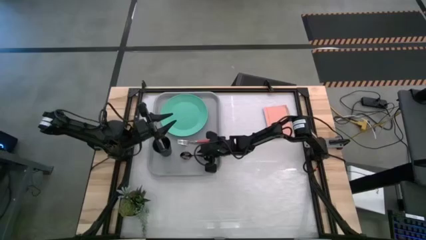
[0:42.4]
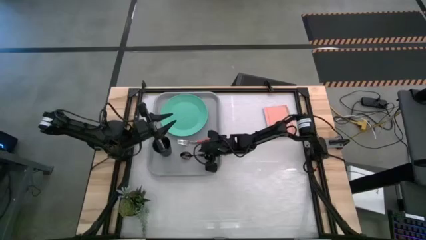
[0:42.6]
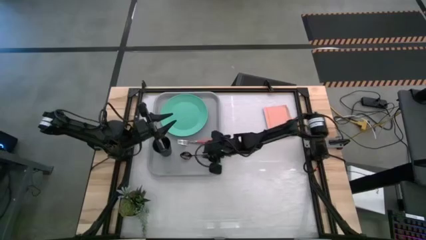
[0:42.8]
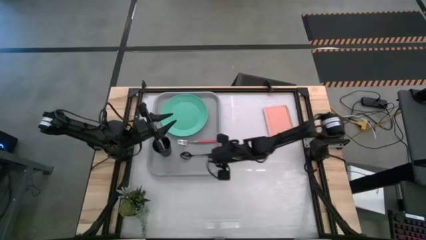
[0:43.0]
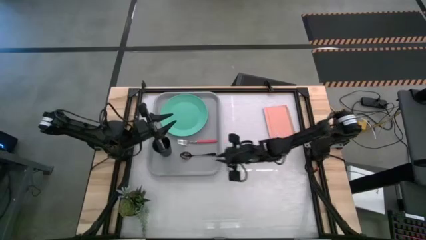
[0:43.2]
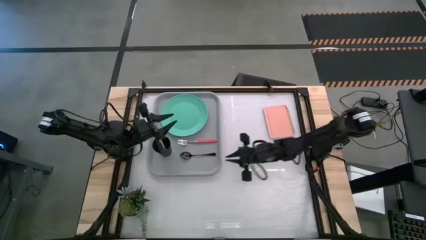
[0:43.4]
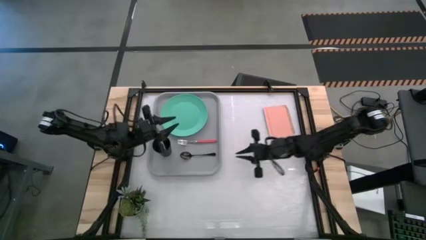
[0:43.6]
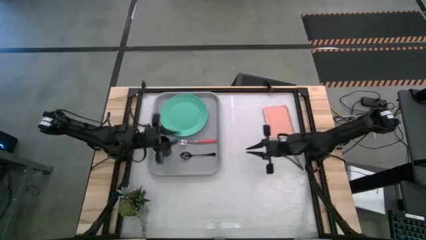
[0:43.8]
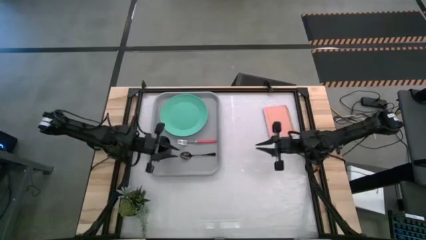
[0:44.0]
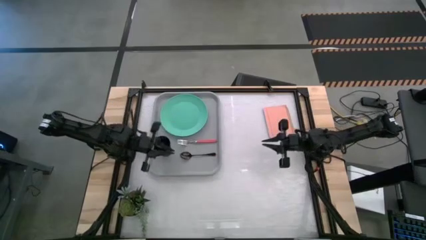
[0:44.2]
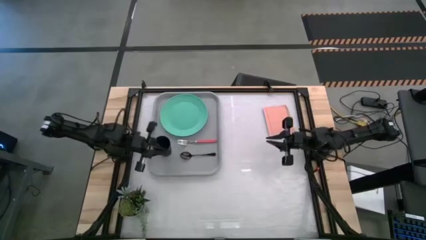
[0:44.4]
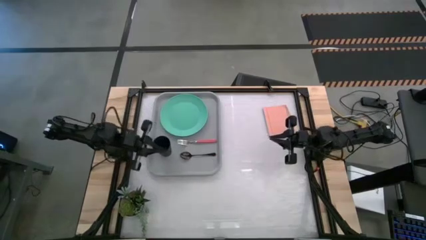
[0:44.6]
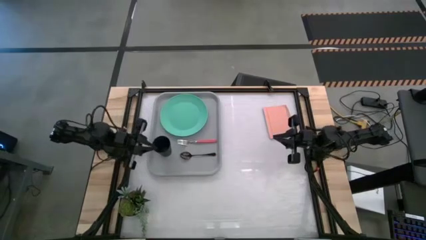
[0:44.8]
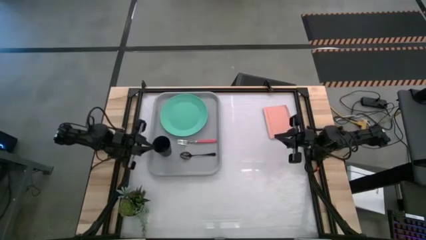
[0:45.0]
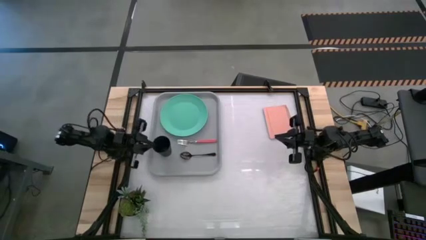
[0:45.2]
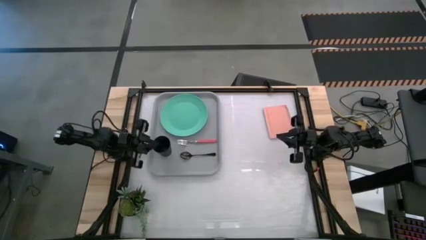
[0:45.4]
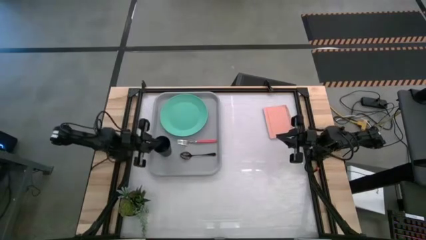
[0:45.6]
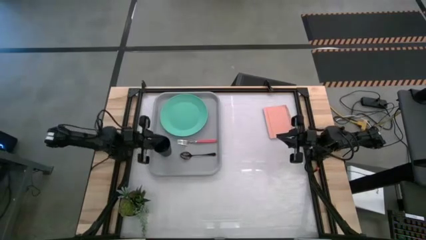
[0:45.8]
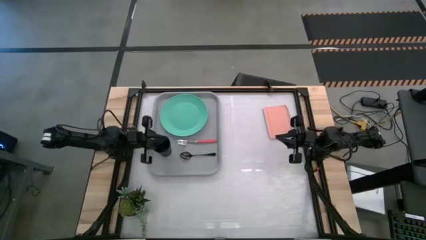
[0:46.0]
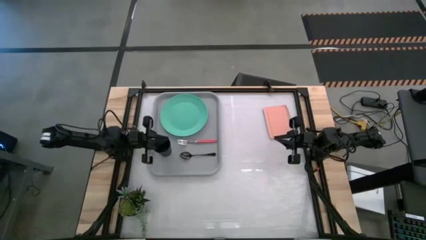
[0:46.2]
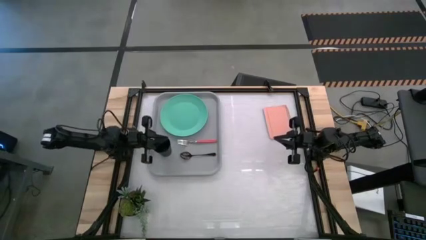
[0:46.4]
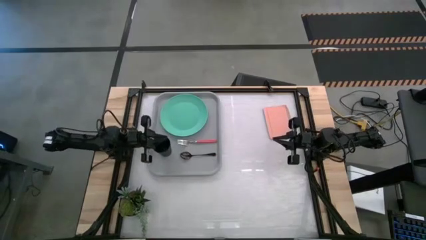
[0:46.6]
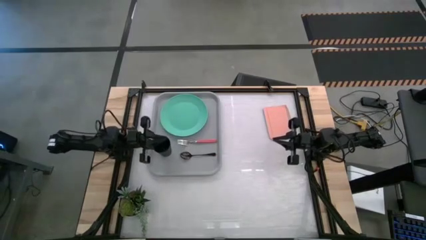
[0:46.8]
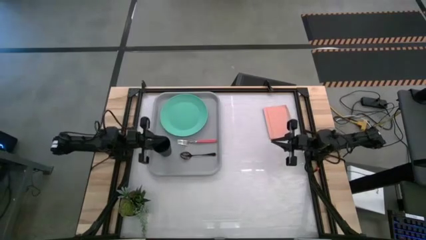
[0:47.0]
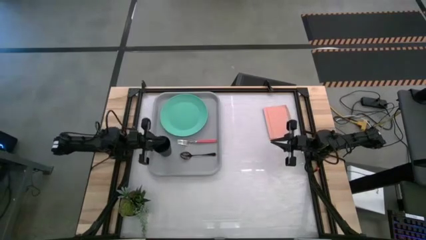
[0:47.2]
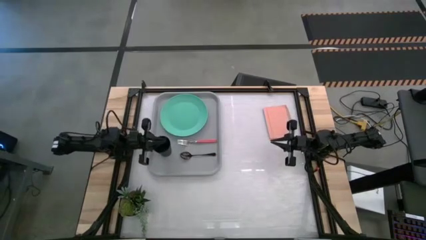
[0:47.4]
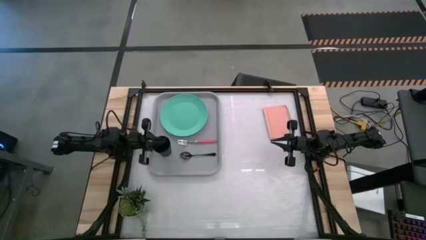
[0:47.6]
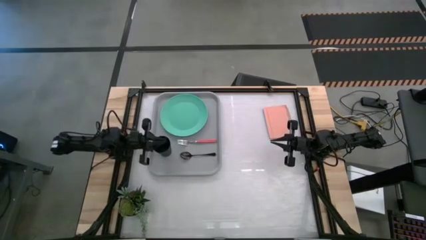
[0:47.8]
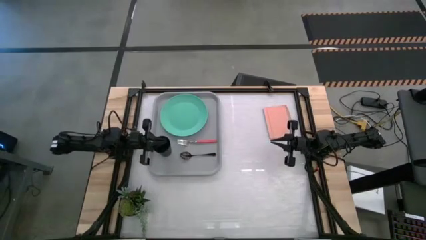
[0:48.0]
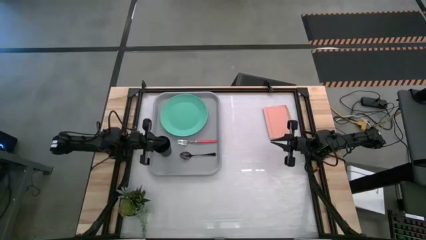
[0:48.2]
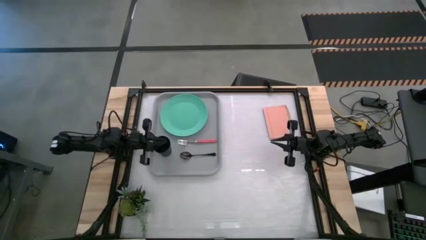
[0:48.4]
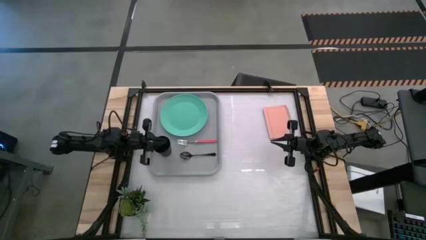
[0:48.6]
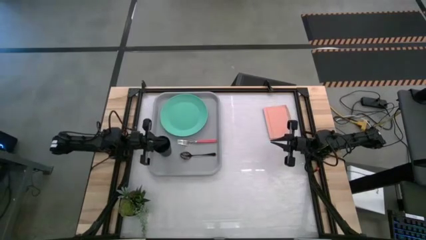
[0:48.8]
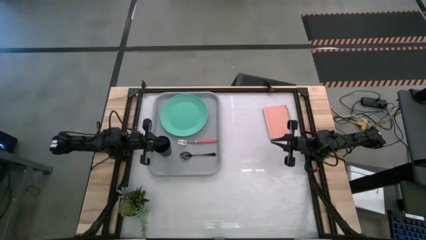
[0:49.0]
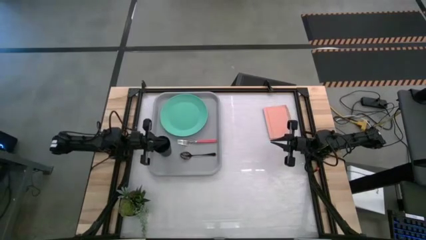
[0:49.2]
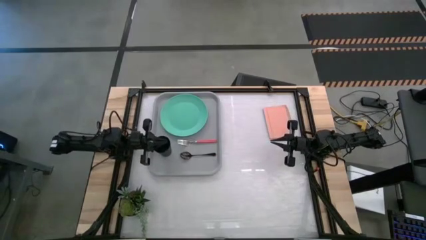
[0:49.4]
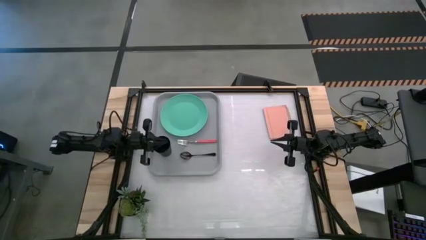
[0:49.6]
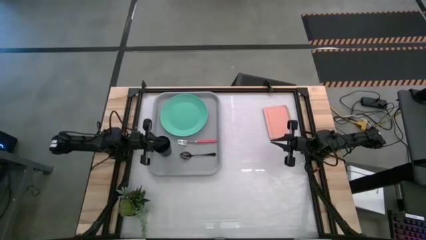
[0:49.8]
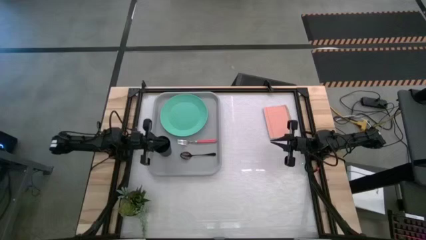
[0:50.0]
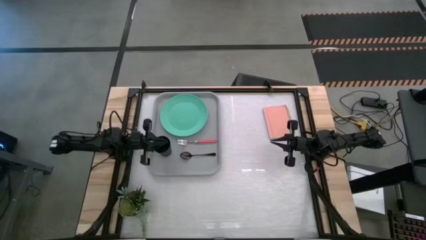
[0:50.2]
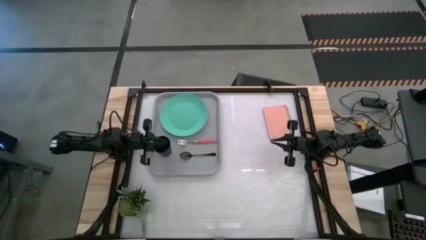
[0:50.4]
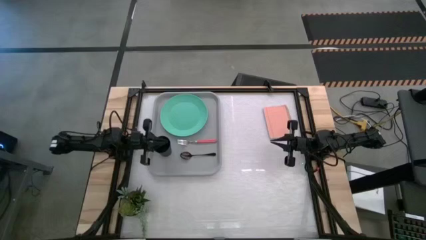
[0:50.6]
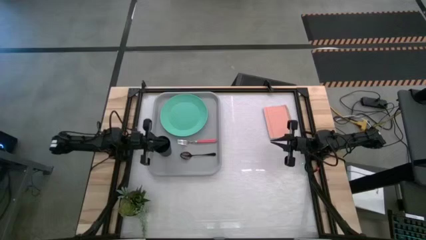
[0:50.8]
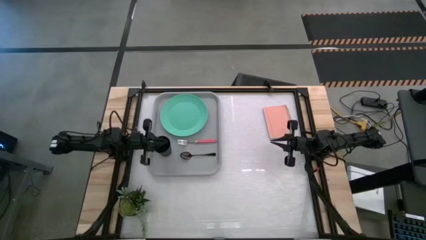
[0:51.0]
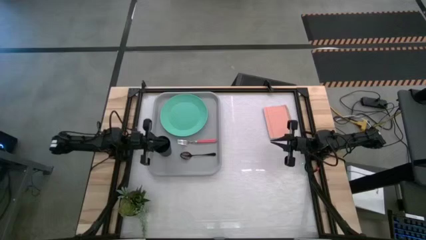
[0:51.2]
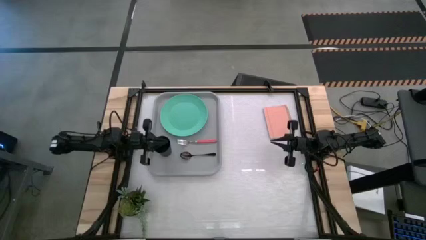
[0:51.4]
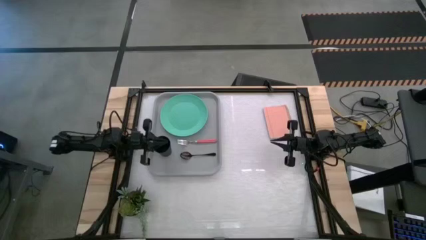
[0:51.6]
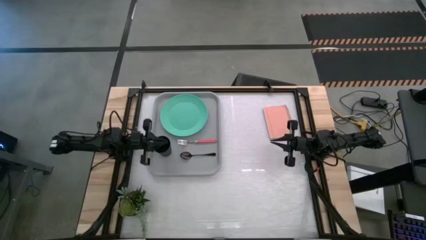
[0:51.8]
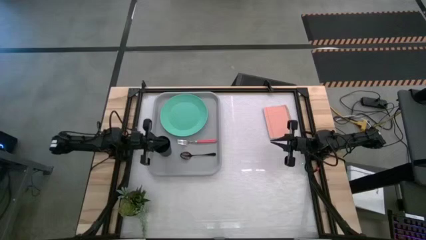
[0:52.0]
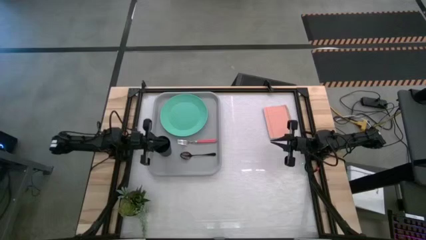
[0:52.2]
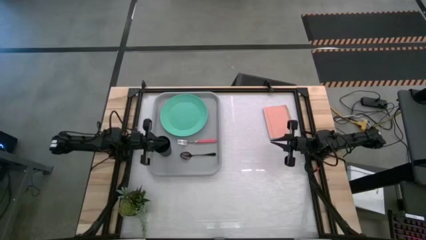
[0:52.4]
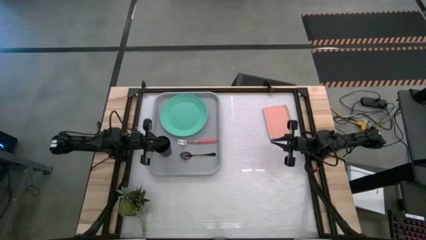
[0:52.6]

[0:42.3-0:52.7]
Task: Pick and place plate/cup/fork/spoon on tray
Return to Home Position

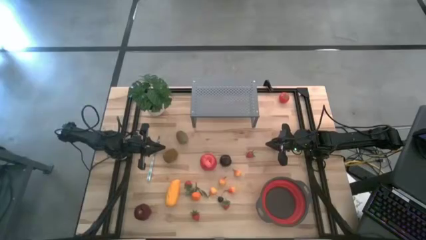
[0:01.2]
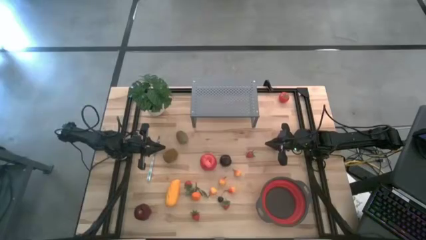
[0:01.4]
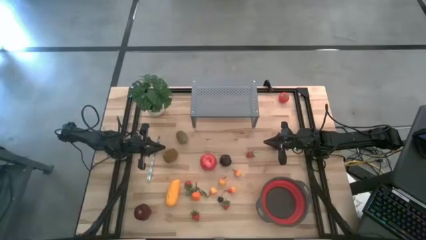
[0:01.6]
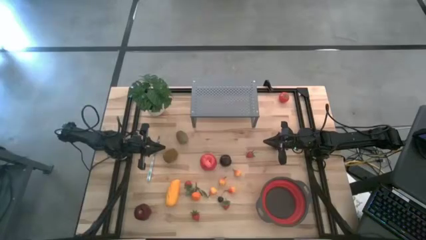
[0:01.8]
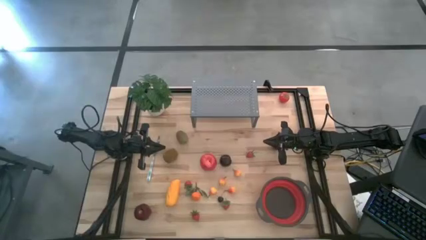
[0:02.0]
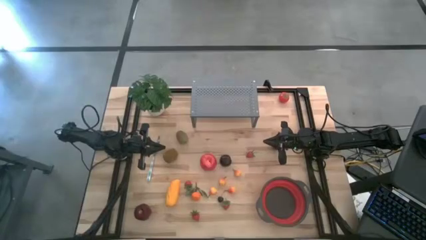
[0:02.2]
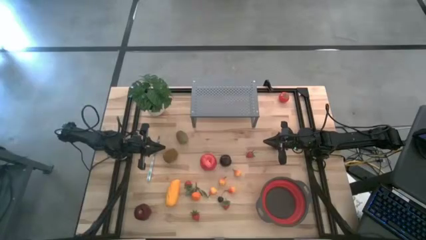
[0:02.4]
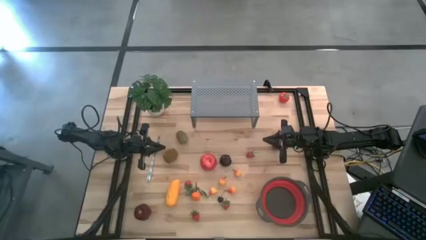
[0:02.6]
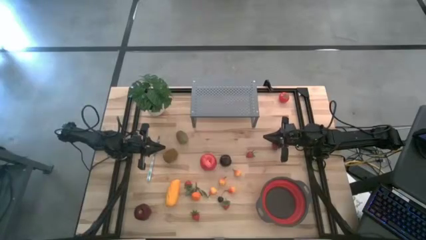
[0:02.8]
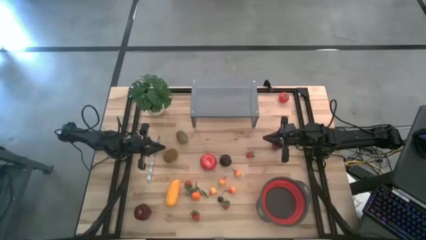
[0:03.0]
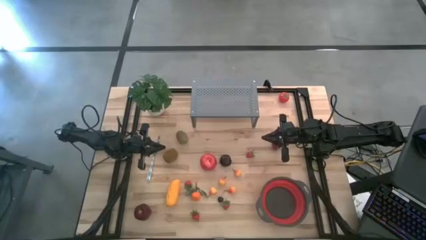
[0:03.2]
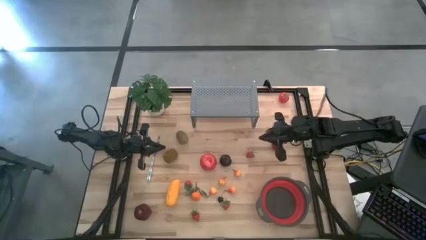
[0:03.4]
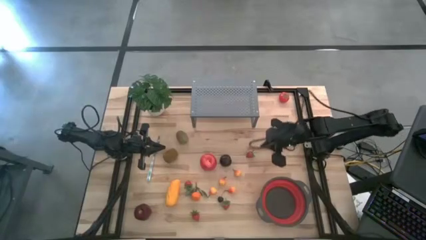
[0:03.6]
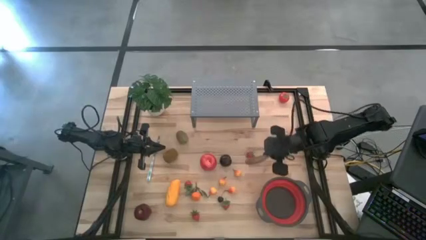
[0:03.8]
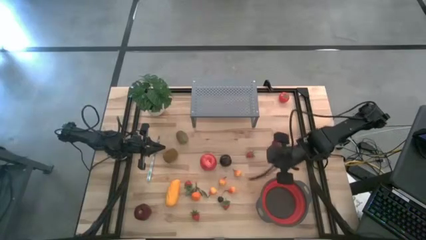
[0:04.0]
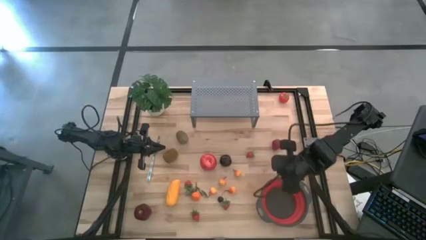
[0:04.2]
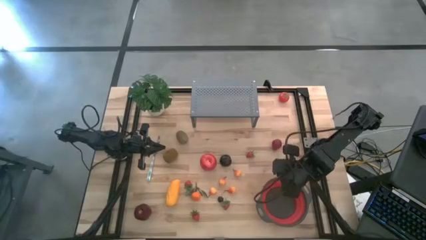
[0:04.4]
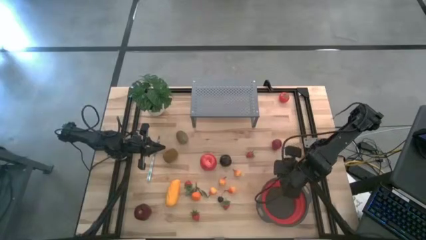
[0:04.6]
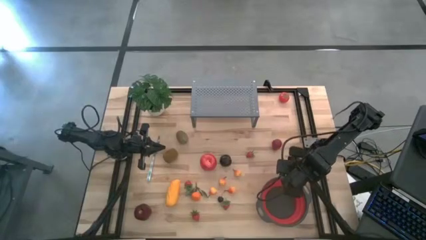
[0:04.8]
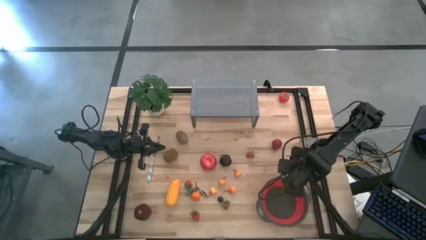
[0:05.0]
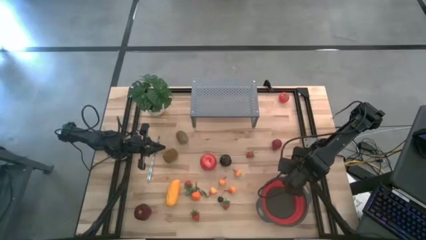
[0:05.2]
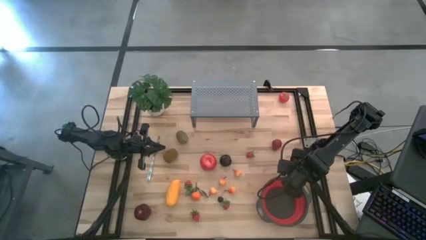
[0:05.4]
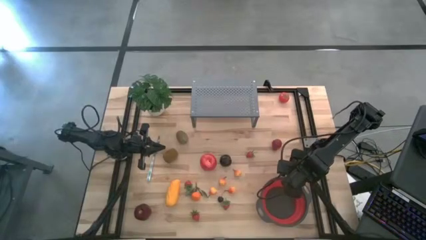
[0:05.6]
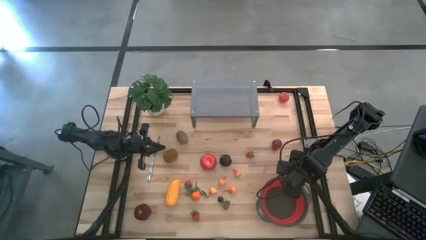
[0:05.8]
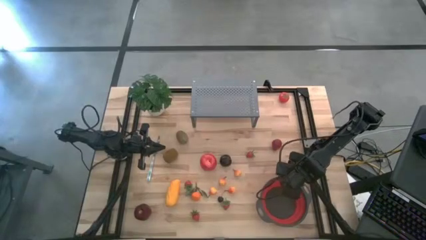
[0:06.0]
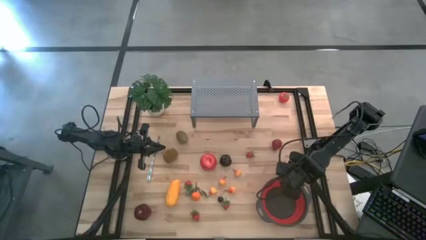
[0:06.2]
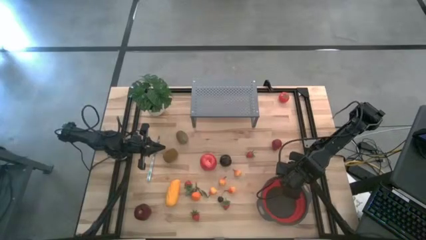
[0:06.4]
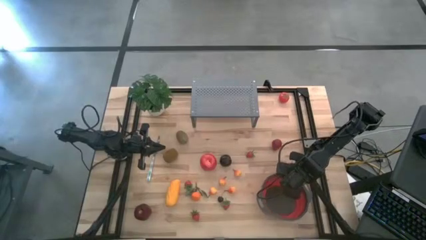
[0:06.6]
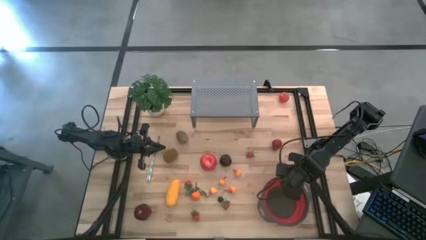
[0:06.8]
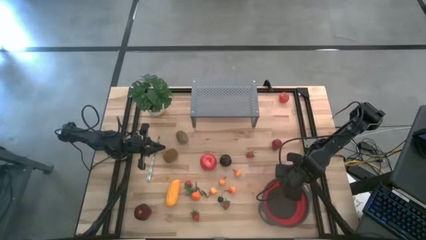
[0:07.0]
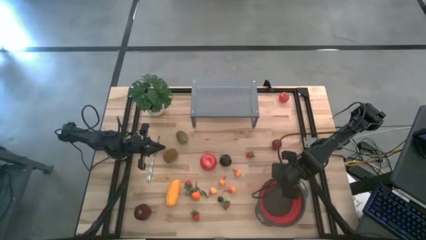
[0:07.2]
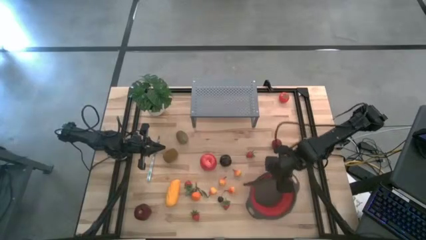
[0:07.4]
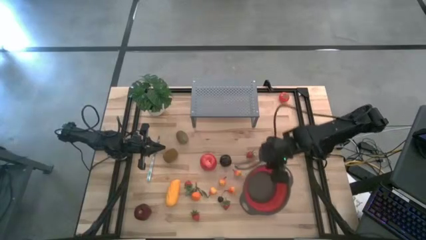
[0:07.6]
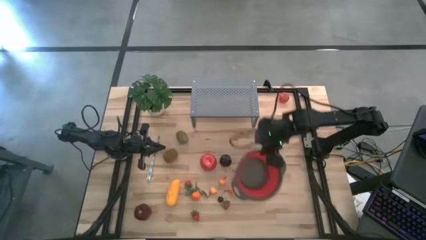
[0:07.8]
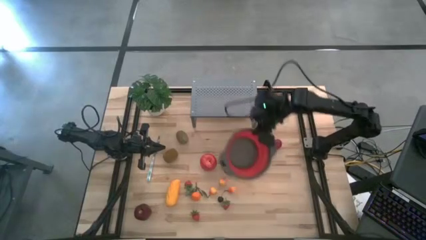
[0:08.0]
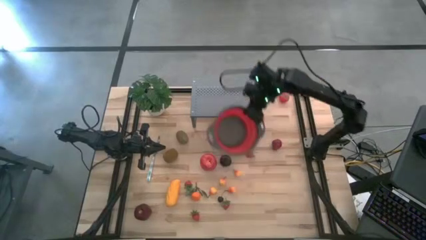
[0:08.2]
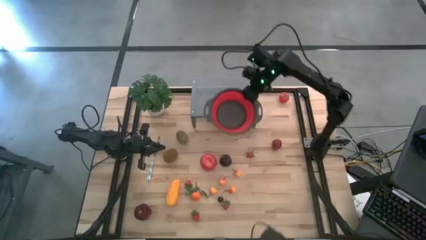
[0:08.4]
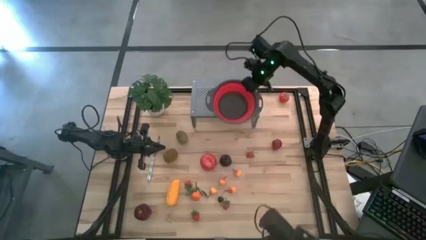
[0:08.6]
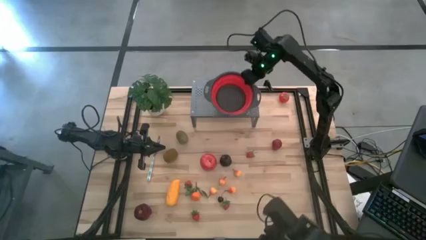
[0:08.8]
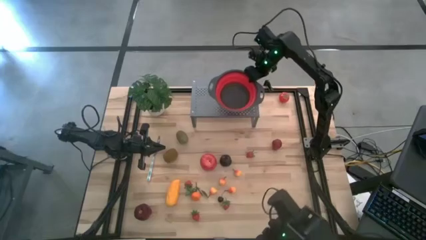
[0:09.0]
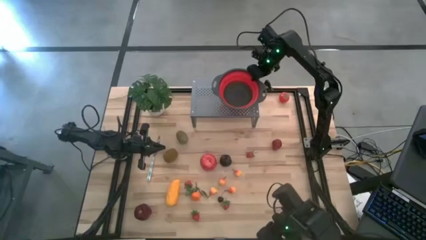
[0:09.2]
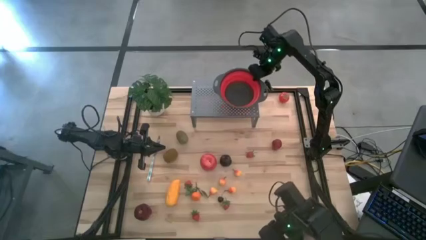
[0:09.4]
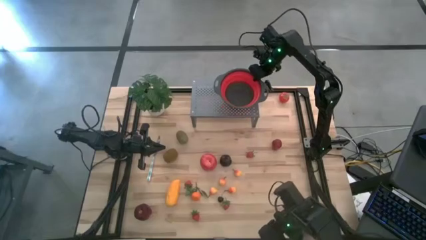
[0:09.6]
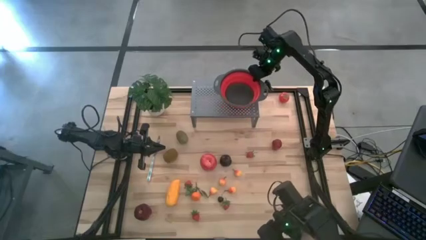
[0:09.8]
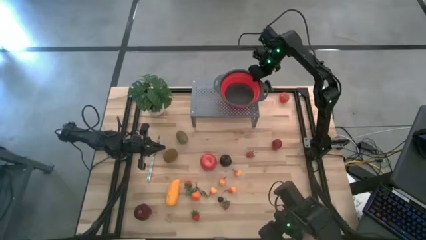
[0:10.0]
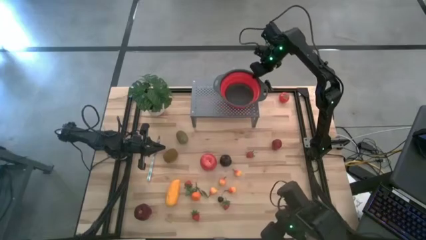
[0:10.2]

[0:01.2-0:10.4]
Task: Pick & Place Fruit
Put the strainer bowl on the shelf
